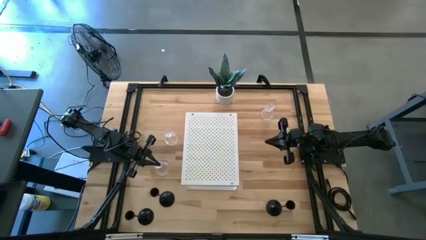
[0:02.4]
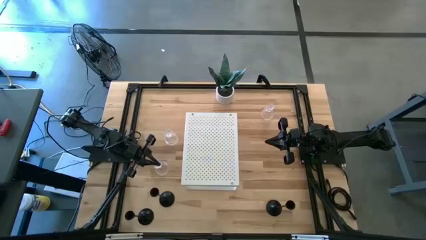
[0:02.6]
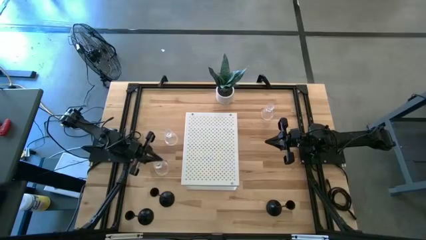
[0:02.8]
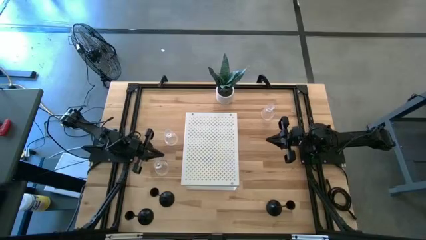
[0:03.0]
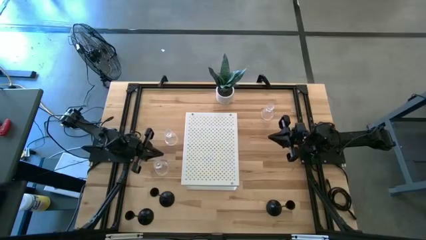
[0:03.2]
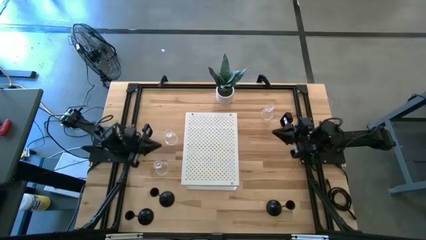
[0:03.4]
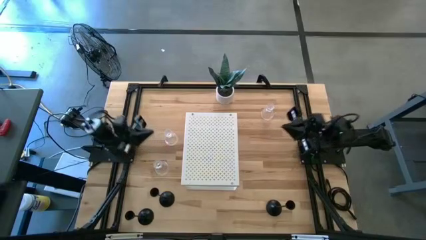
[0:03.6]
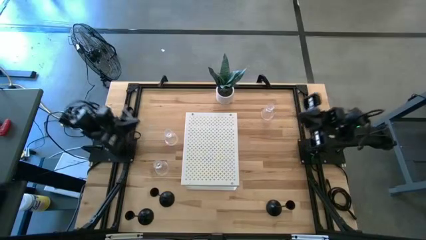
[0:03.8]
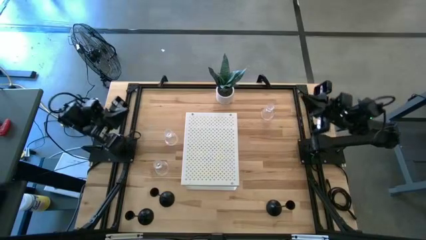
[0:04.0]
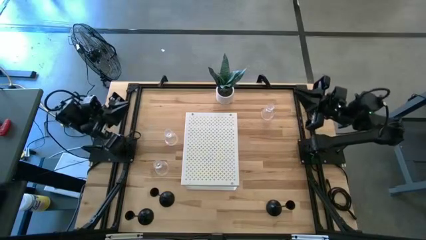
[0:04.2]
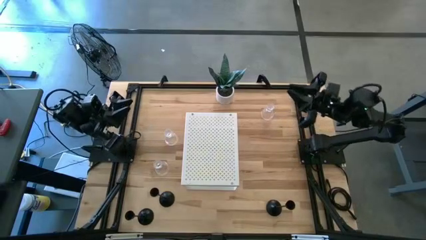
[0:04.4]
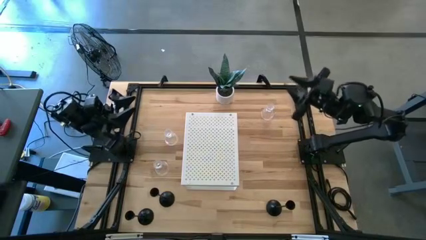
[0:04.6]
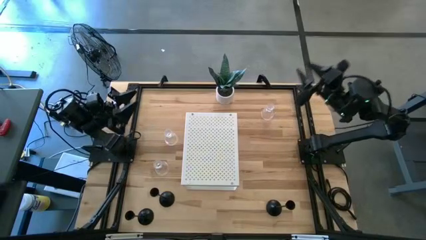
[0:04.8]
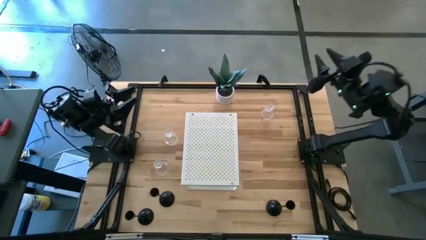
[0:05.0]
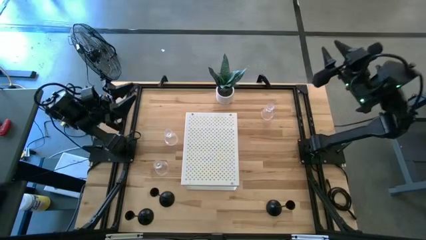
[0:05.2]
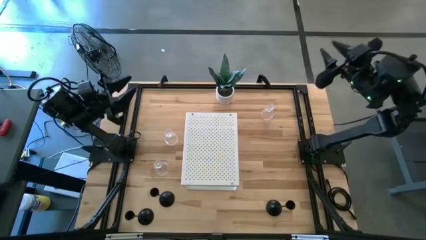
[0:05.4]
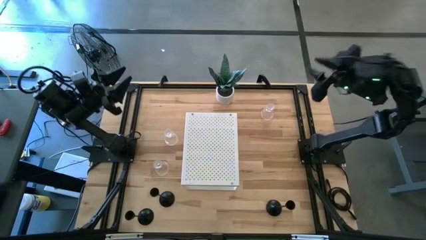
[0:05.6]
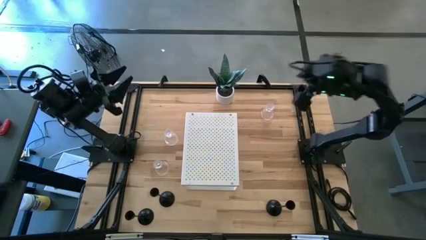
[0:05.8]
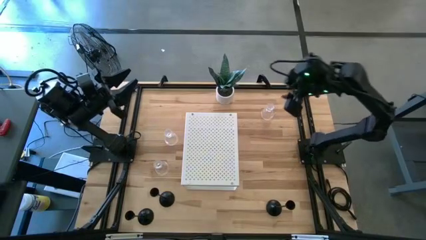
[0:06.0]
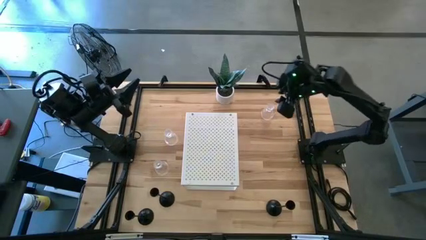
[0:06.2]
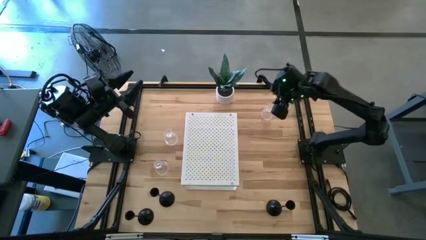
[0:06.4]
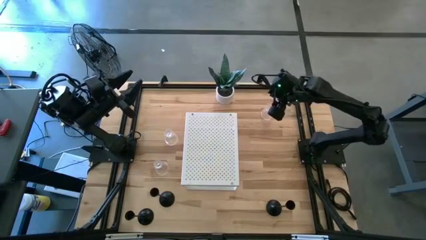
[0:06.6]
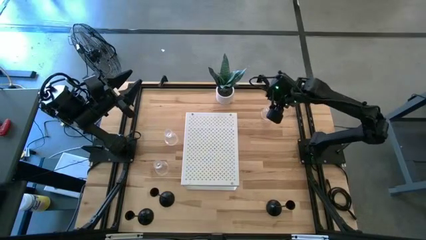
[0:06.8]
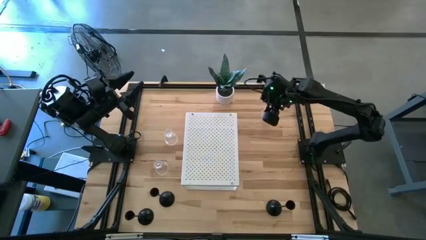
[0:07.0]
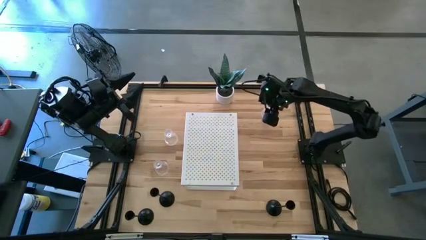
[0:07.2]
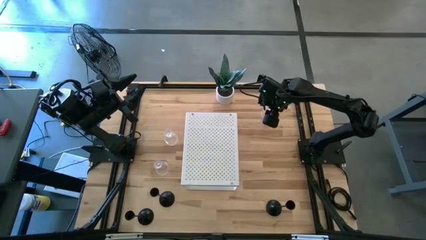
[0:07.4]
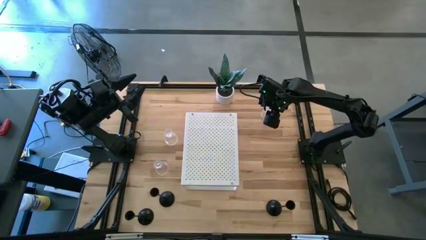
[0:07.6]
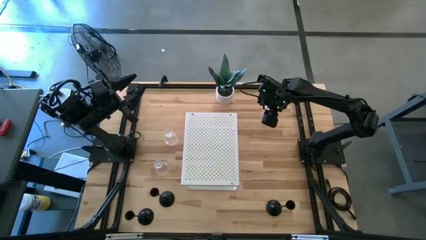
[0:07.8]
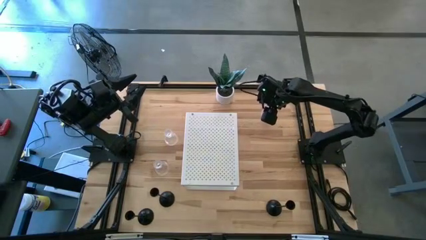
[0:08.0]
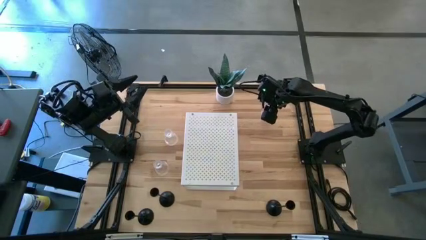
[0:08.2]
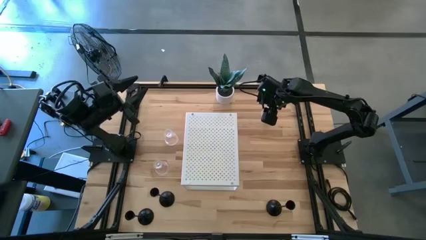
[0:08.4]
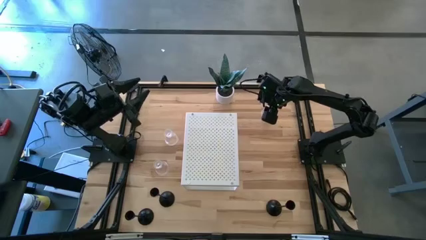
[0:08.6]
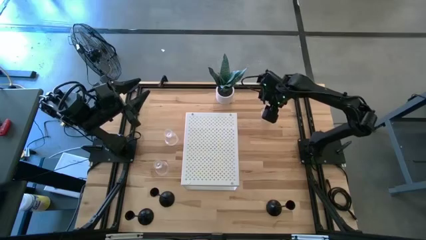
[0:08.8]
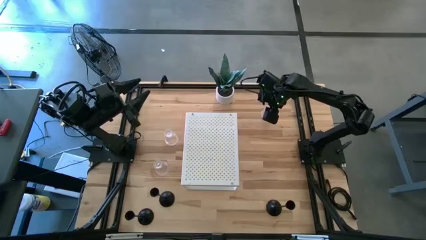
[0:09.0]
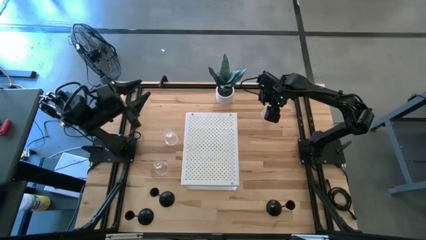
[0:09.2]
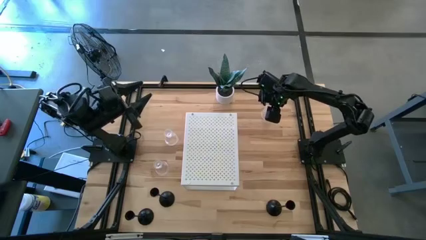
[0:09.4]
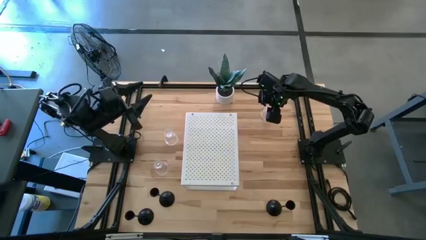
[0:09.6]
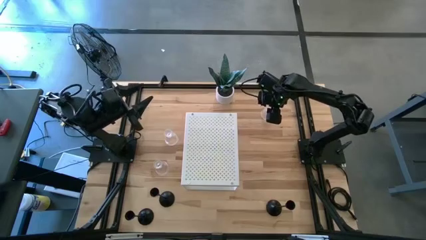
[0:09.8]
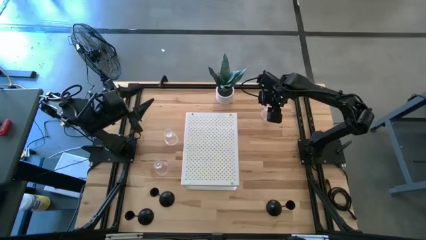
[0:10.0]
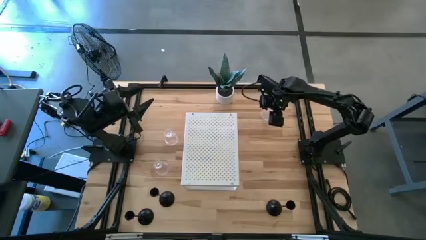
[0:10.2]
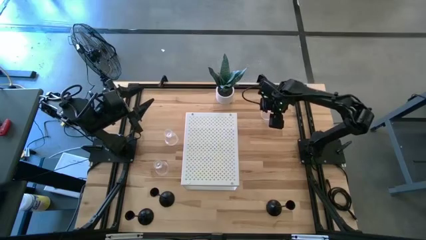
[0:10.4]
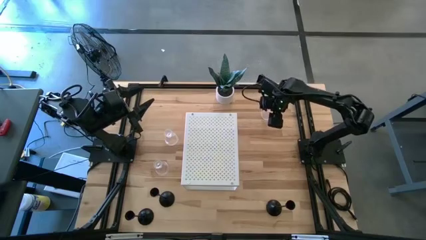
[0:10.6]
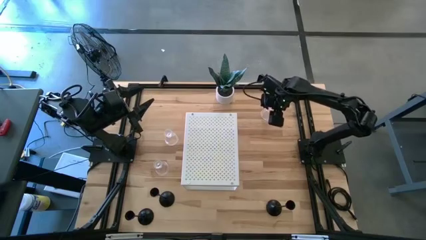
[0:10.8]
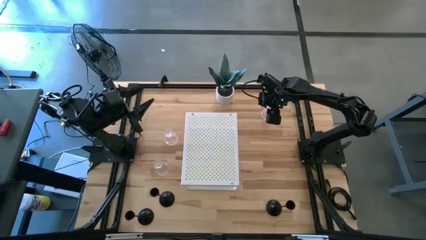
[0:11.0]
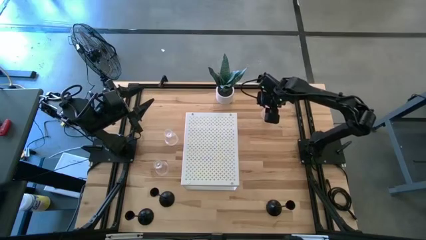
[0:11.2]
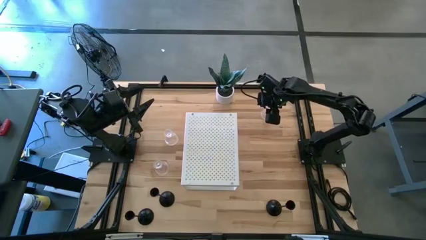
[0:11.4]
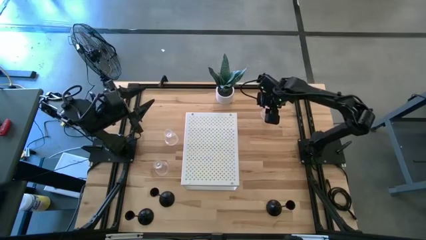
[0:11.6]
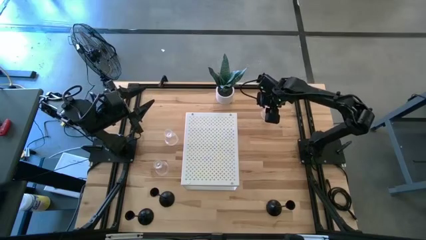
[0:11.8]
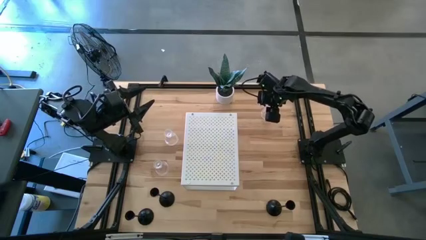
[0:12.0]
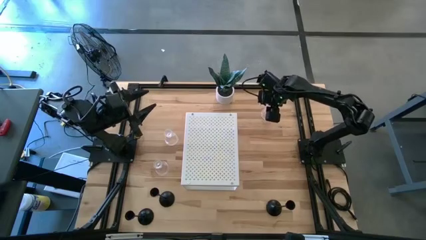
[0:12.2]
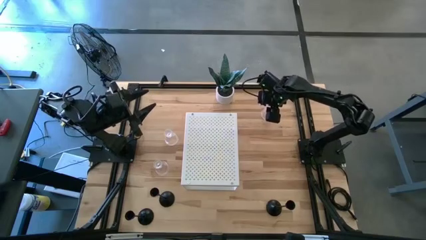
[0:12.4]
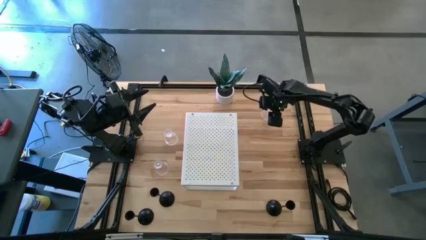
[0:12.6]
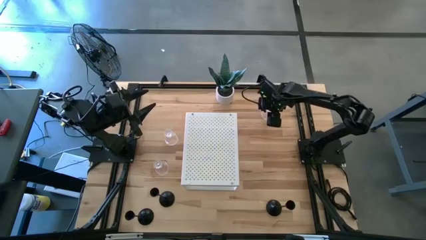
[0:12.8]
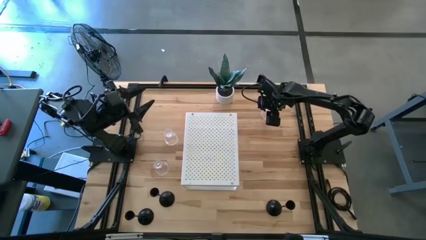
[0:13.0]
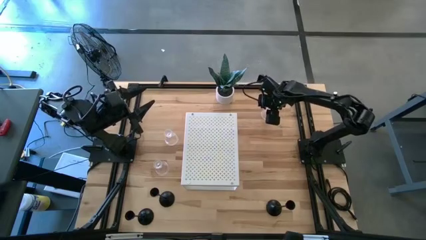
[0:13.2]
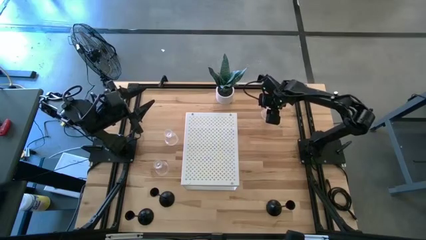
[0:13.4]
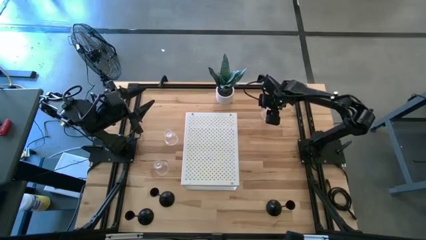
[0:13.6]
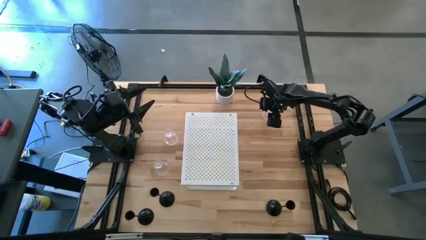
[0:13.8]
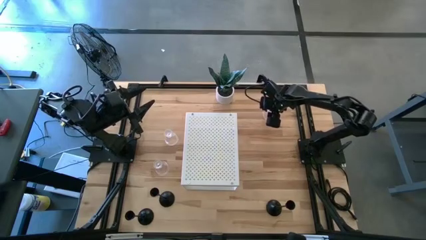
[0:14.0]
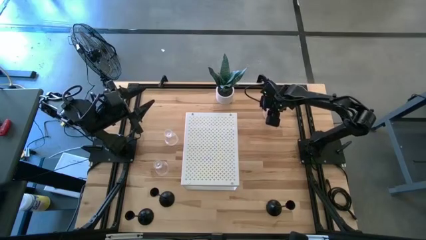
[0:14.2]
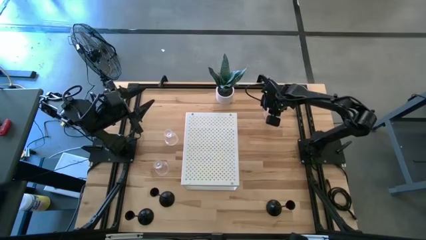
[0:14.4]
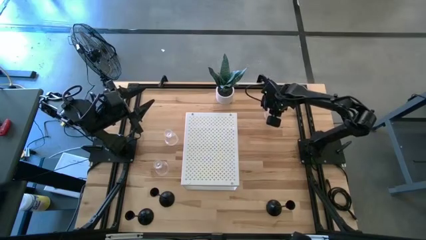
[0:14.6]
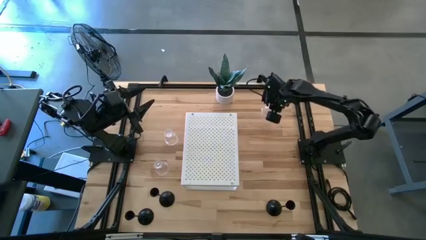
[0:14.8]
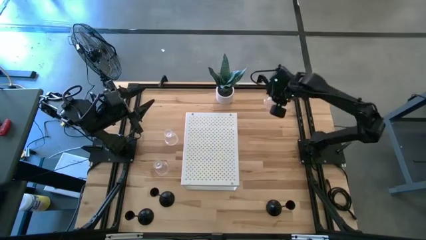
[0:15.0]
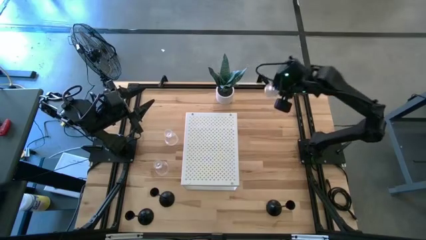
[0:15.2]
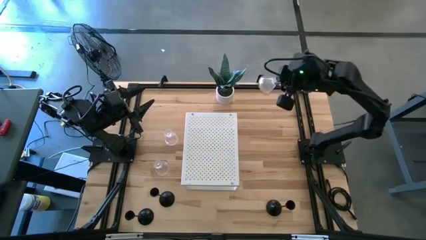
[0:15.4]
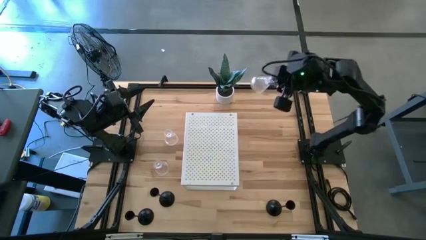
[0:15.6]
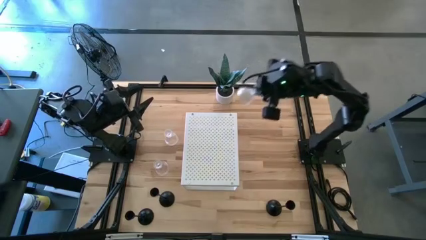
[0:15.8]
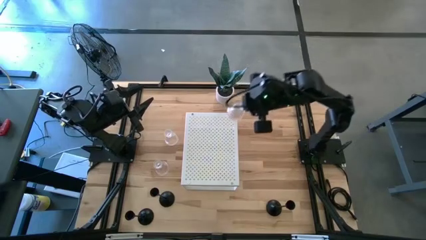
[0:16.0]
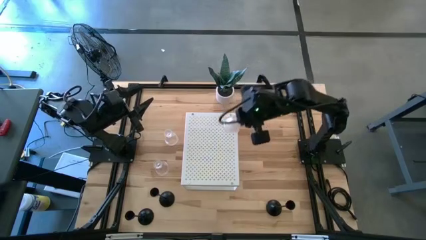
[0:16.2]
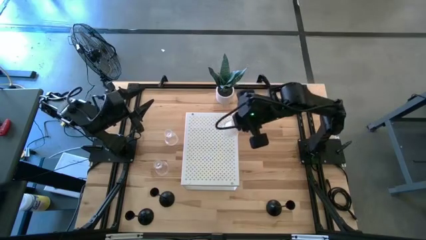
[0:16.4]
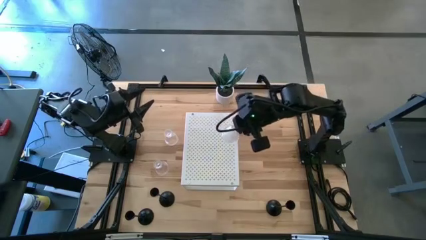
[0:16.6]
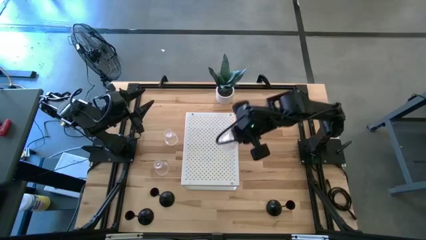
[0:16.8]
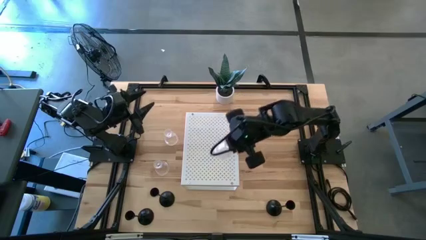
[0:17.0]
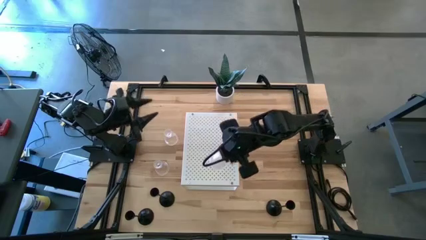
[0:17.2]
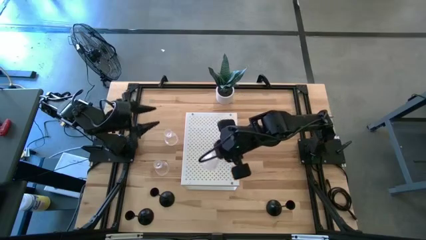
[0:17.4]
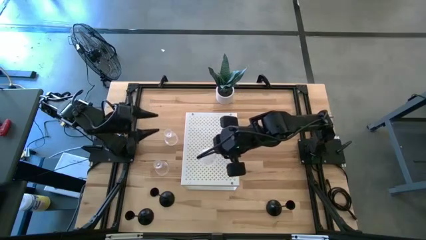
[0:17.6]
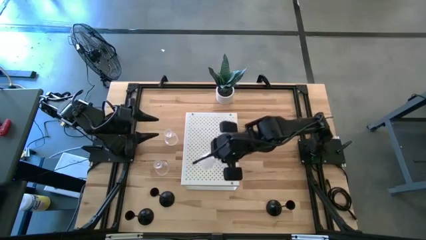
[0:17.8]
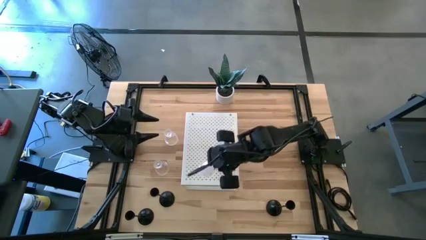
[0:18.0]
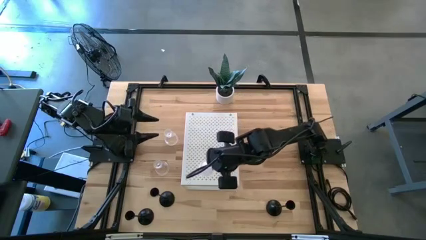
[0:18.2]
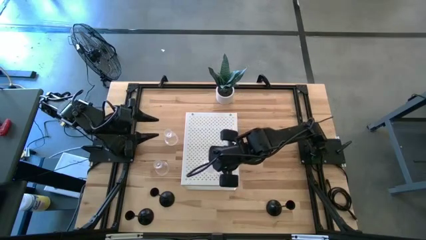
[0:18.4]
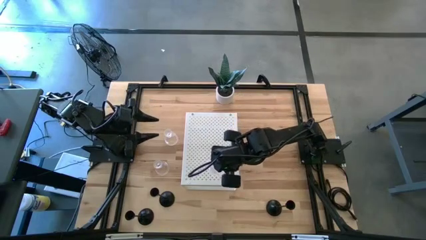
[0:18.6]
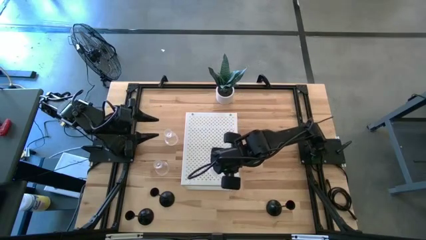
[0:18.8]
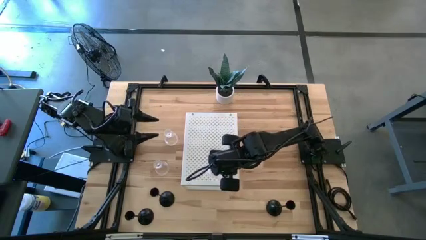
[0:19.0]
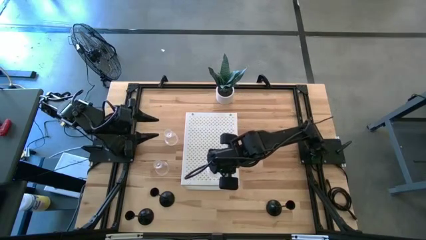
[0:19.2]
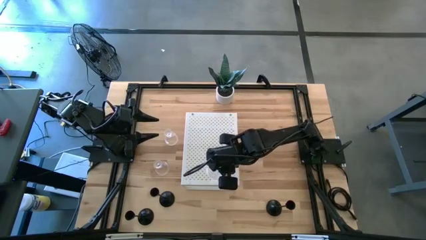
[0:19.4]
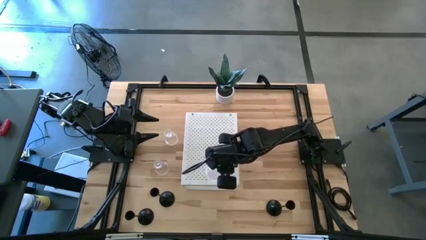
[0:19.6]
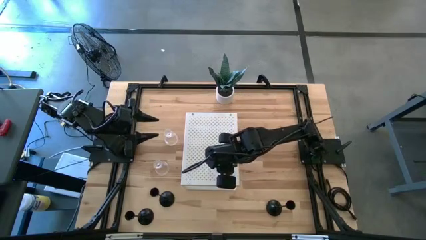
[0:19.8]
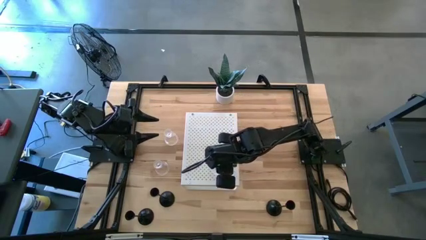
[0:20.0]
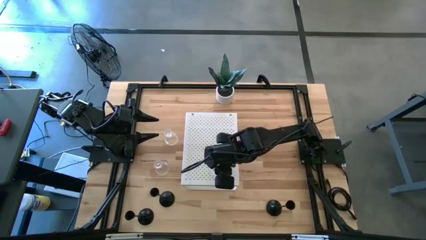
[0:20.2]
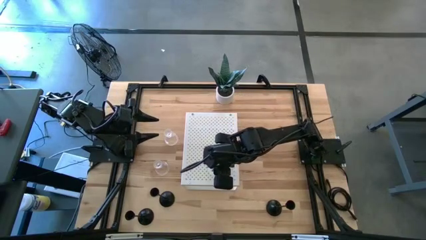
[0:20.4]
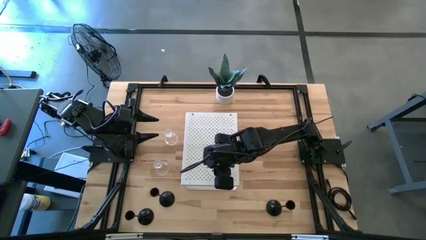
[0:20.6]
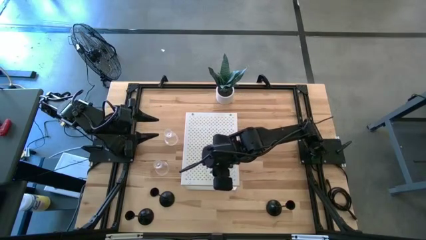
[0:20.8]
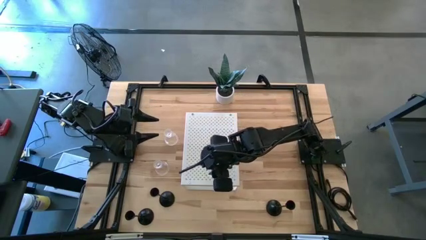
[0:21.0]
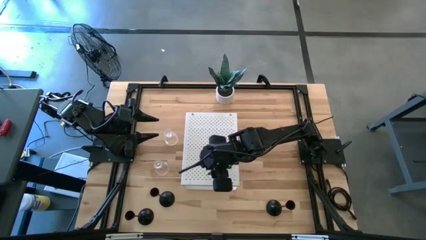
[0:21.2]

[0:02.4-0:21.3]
Task: Pick & Place candle stick holders
Put the top transparent glass candle holder on the shelf
